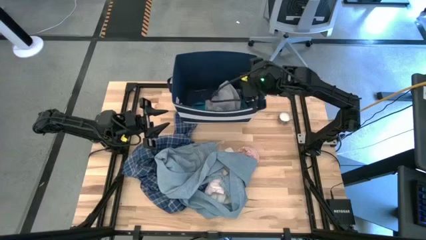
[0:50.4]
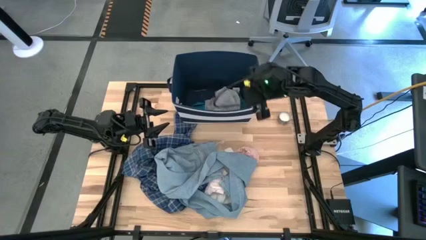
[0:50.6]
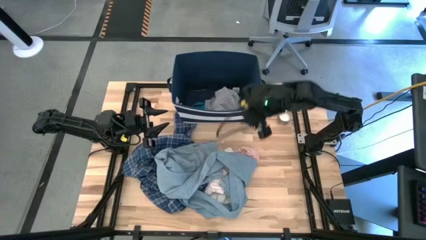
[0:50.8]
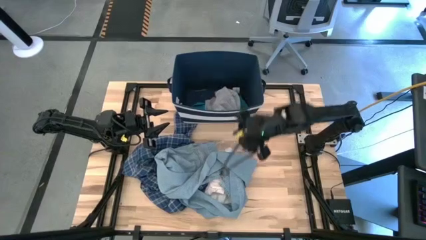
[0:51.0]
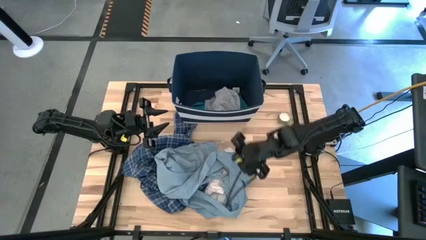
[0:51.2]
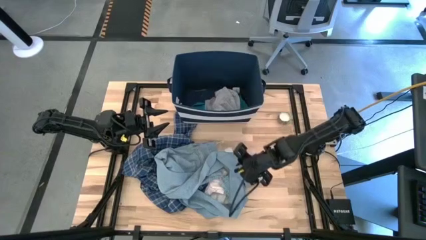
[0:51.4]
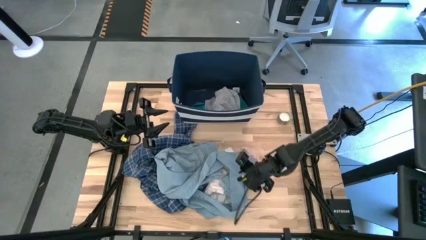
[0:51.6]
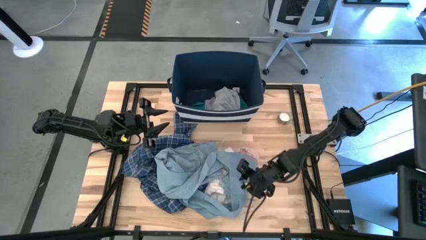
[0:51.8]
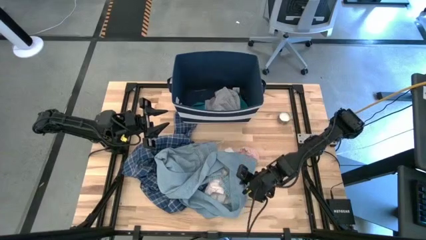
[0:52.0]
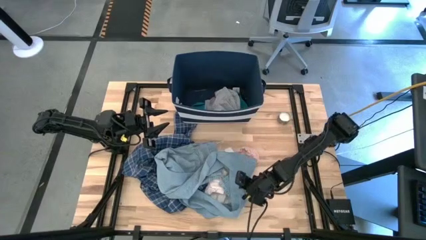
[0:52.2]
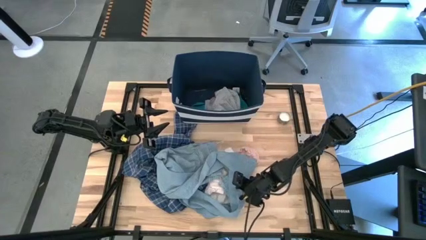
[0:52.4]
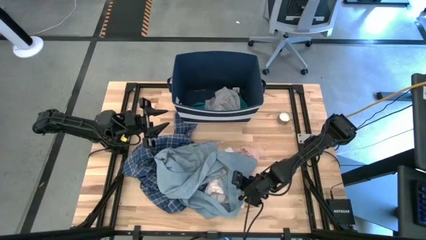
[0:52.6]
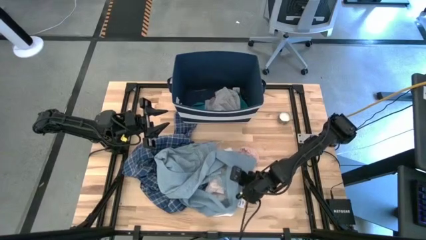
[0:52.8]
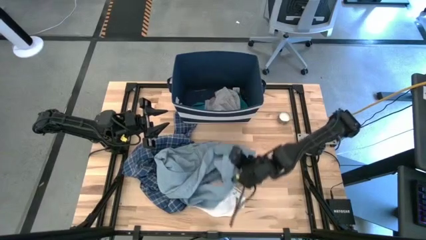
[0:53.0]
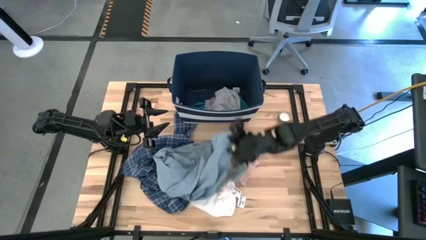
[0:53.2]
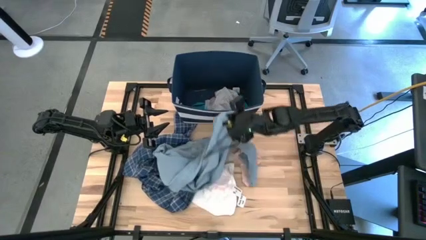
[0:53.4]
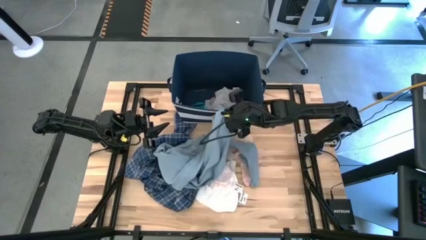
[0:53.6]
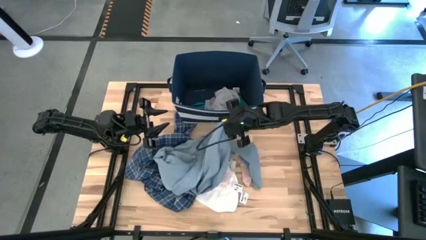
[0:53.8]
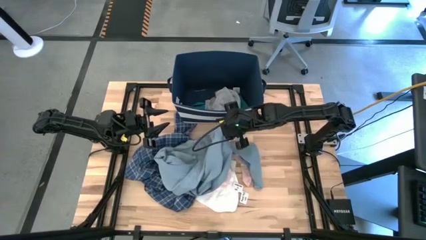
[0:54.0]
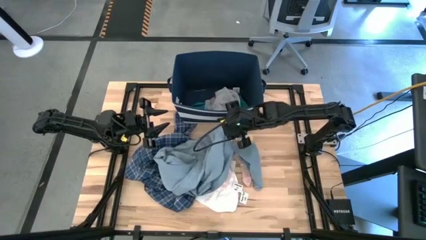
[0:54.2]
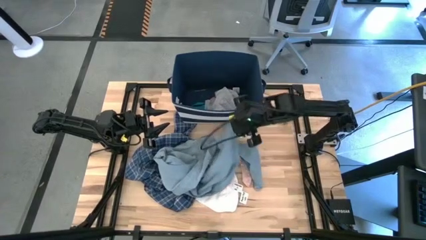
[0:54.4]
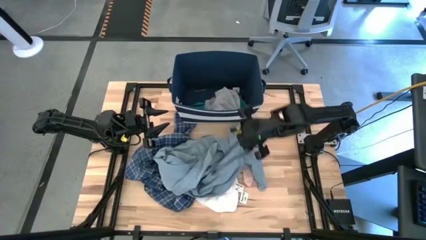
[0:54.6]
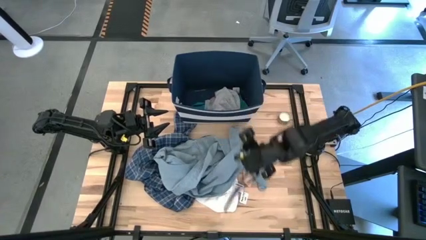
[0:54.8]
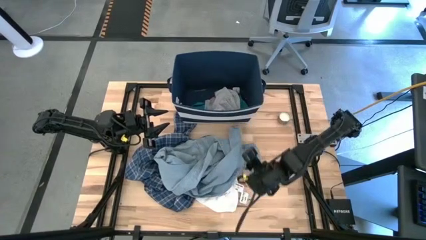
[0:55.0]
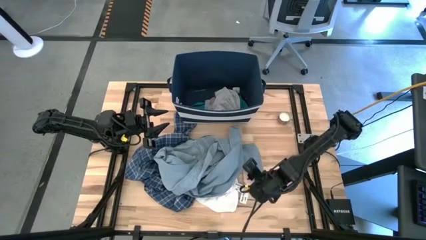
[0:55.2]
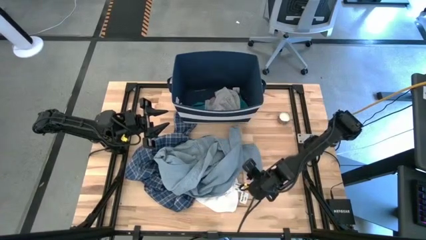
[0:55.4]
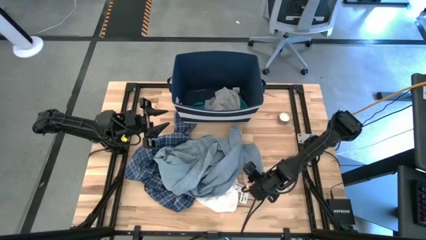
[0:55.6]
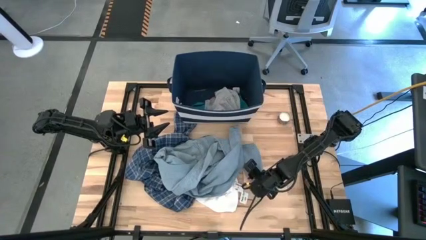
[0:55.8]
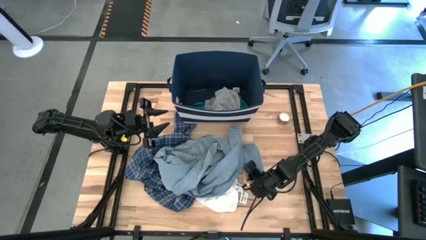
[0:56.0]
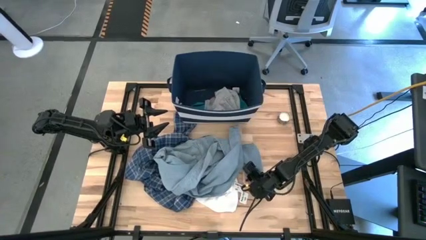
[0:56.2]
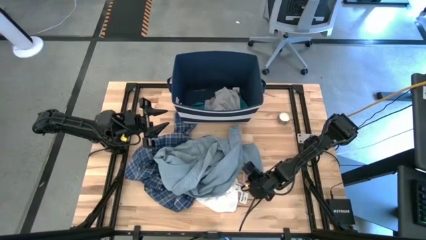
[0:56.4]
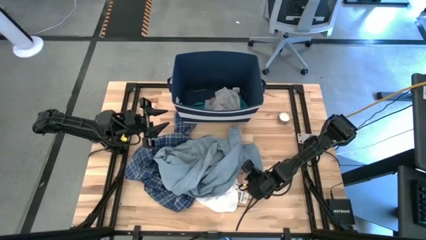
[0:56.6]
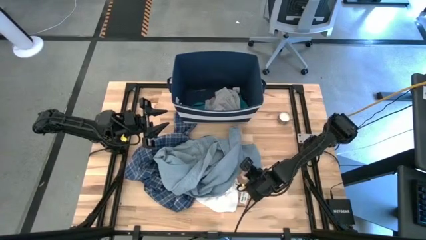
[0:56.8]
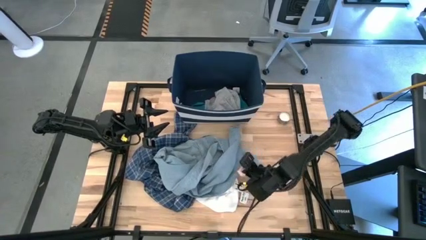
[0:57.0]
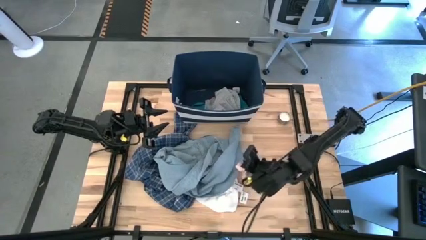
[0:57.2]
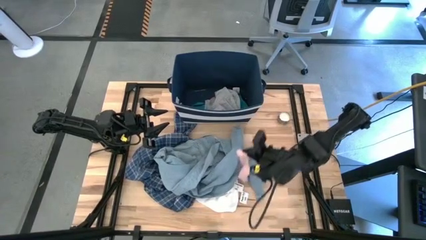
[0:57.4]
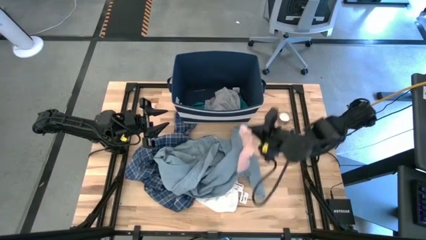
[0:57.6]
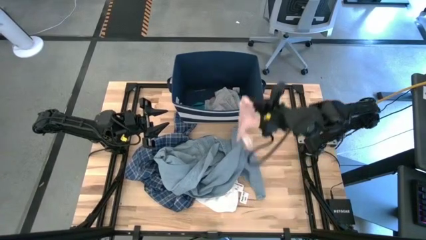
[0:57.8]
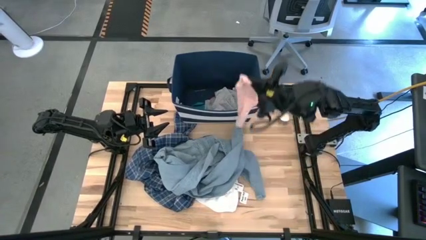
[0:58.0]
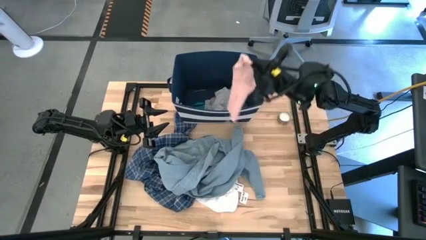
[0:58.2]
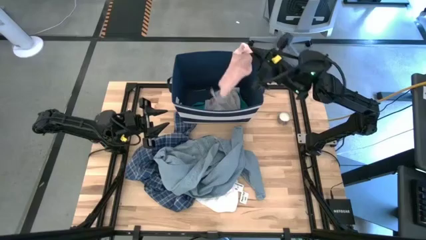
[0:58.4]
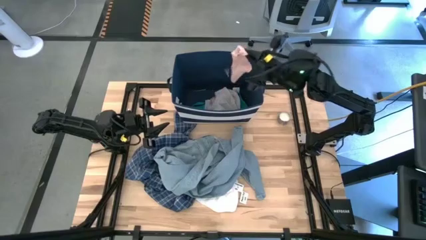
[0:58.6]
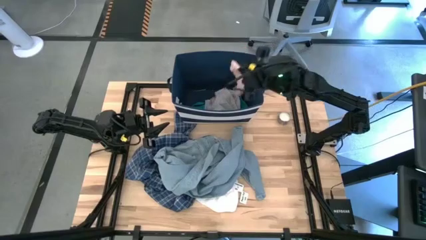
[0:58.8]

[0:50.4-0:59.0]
Task: Sort clothes
Put the pink sock into the blue laundry bin

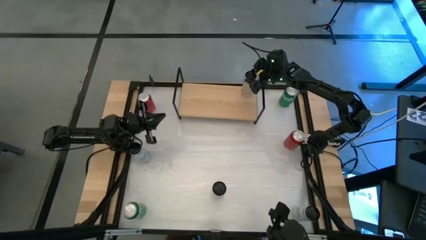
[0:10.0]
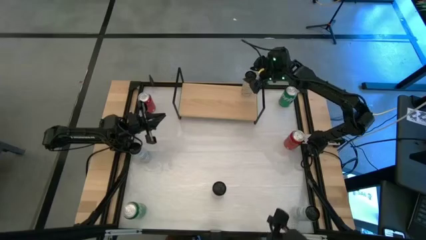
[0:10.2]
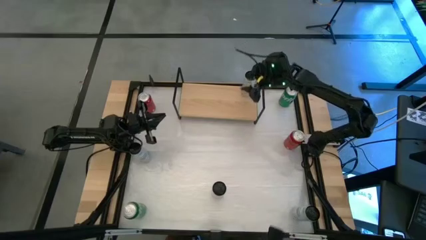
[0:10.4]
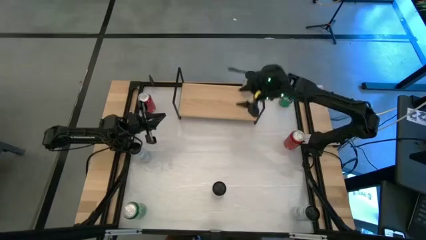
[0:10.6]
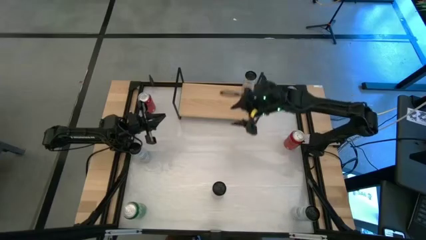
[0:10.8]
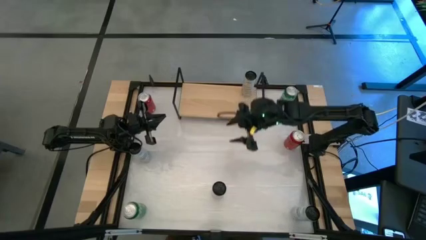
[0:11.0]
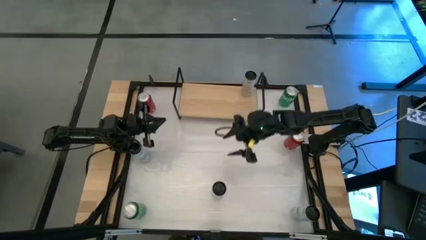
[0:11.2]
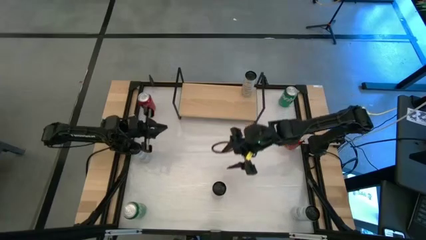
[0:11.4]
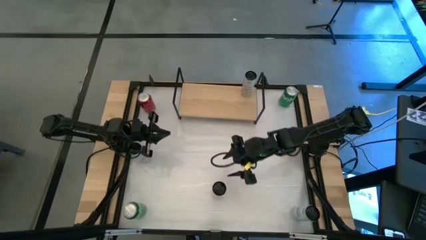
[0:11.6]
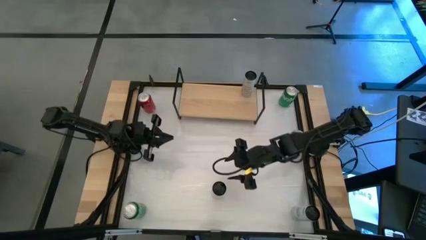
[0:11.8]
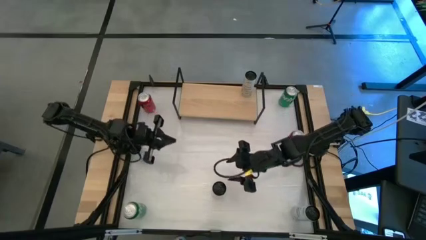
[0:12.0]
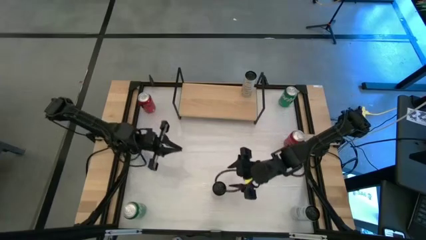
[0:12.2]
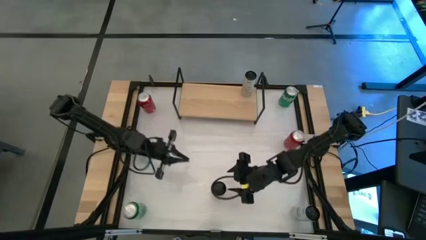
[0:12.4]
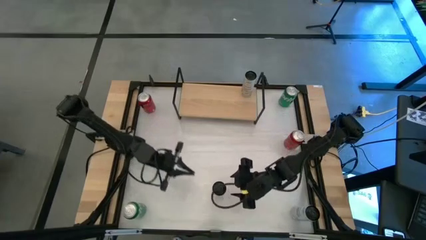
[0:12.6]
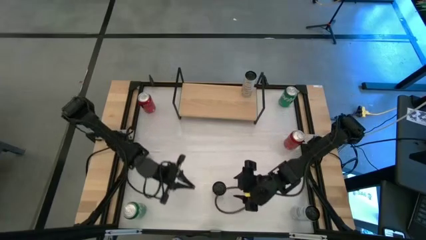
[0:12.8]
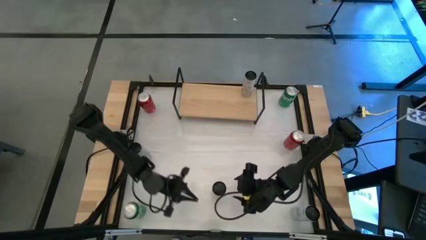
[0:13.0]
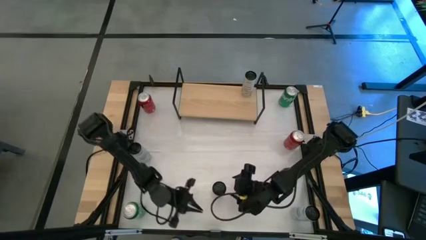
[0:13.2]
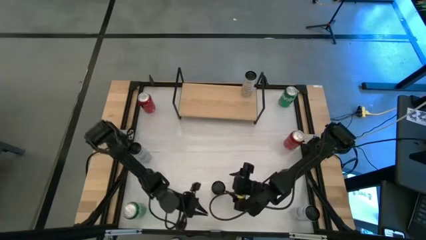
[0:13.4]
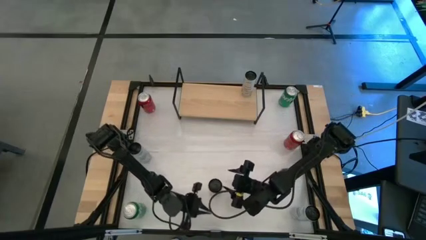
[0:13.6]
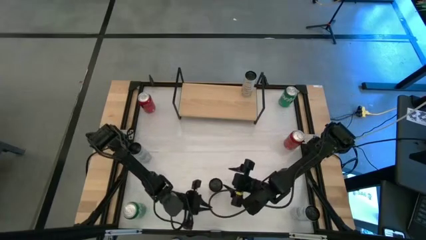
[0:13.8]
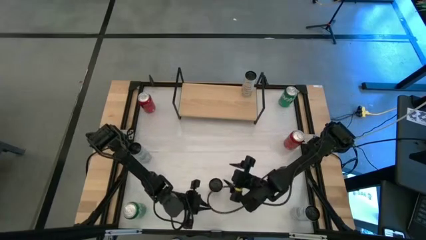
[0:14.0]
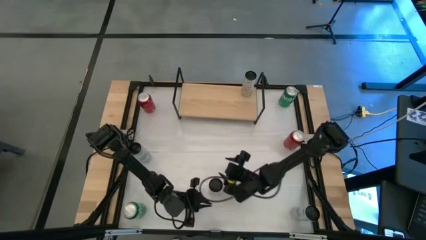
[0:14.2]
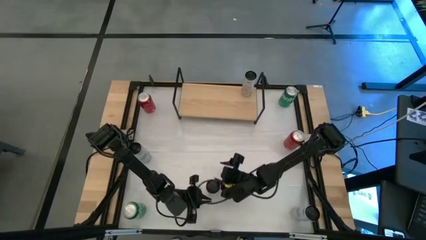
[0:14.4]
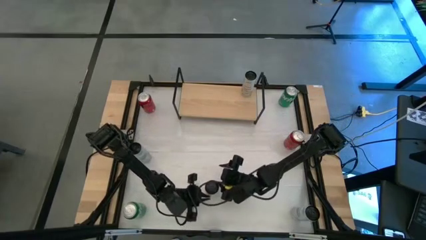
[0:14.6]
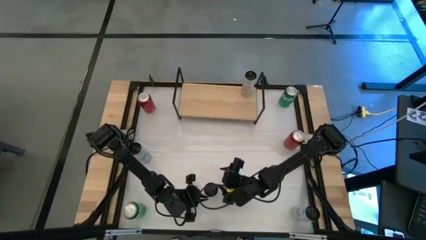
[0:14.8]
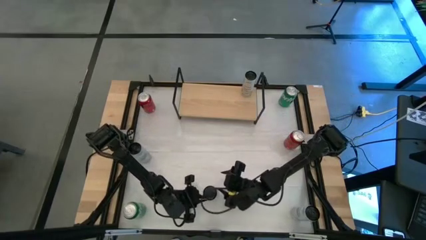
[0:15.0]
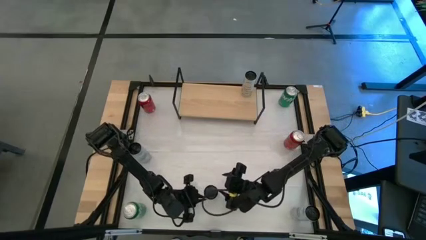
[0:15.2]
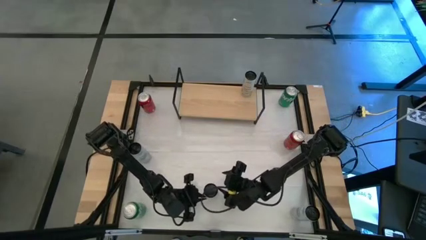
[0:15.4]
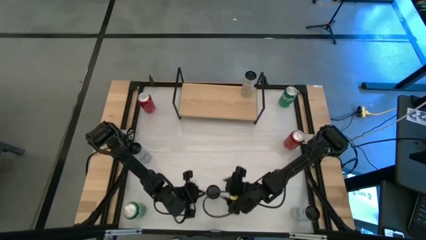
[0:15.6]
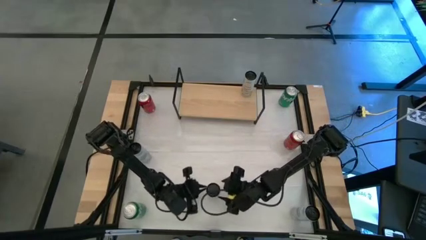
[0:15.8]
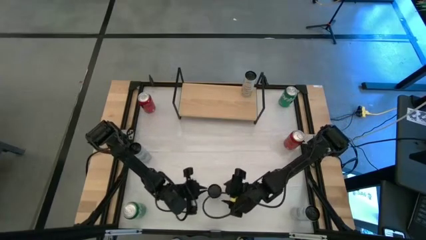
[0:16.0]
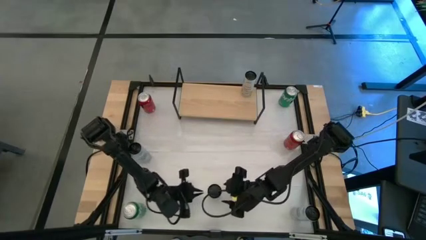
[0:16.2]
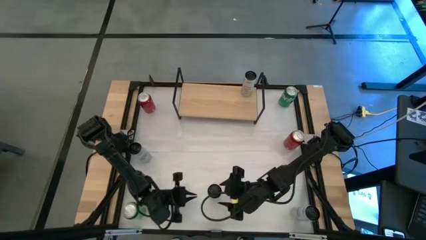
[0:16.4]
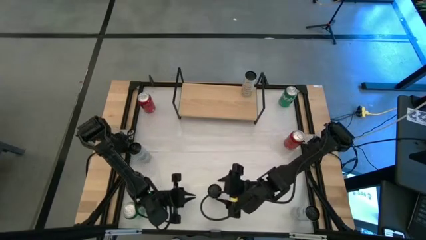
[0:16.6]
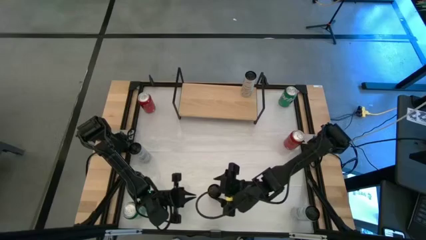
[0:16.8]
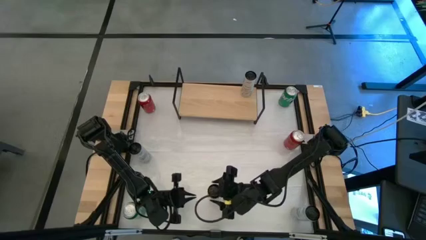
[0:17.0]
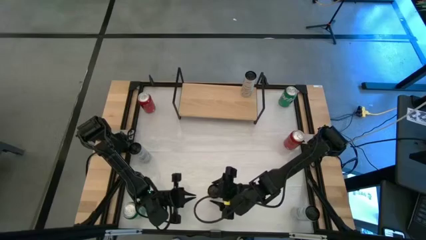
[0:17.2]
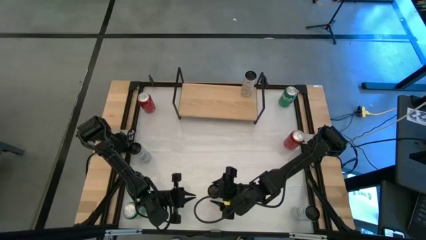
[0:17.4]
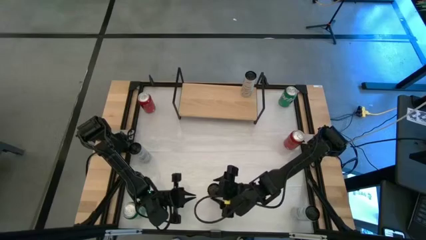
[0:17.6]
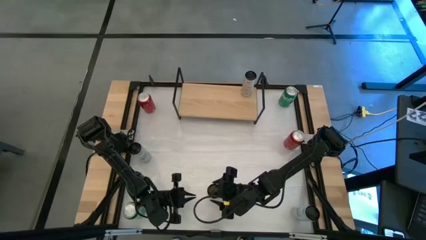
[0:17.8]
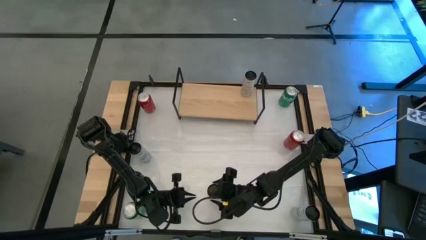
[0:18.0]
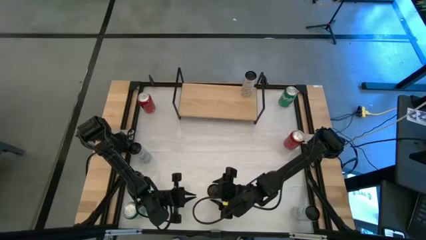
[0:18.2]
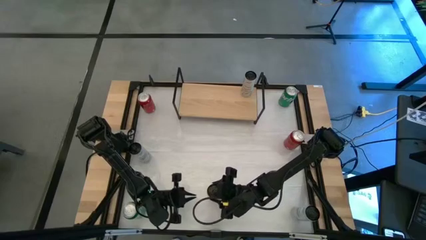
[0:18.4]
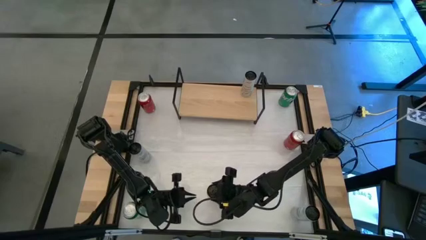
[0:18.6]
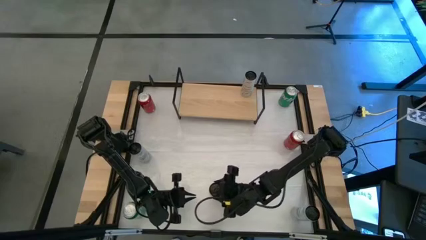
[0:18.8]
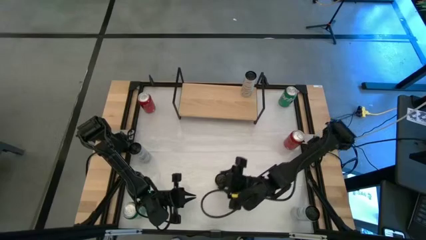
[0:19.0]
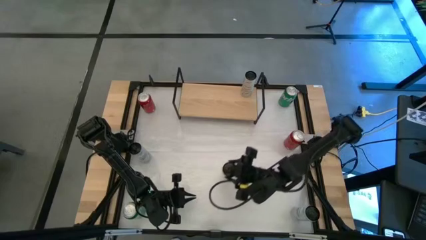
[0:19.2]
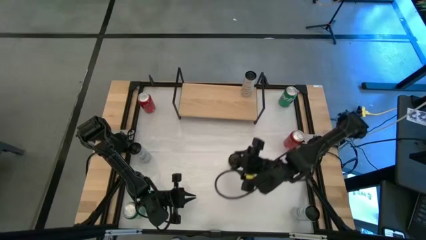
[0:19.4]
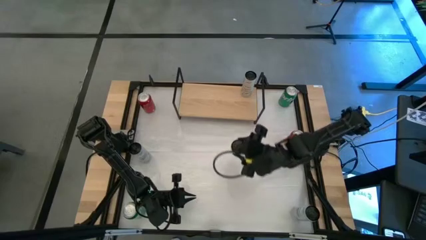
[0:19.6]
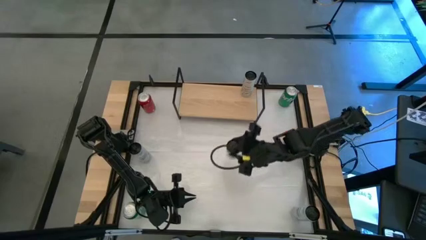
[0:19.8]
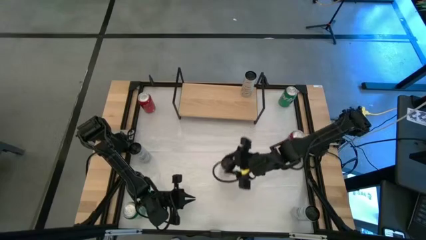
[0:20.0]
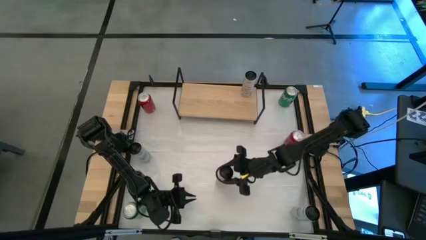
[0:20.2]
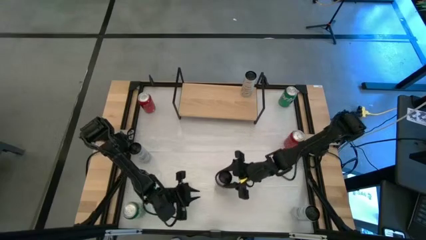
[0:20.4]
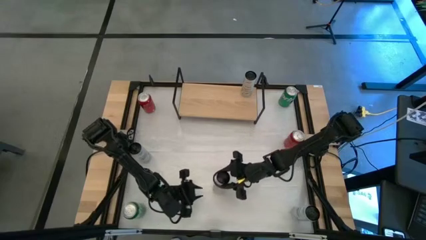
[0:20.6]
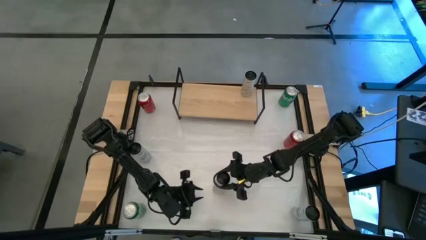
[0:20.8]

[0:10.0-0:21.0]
Task: Place canned beverage on shelf
Put the white yellow soda can on the shelf aligned with the other white yellow soda can
